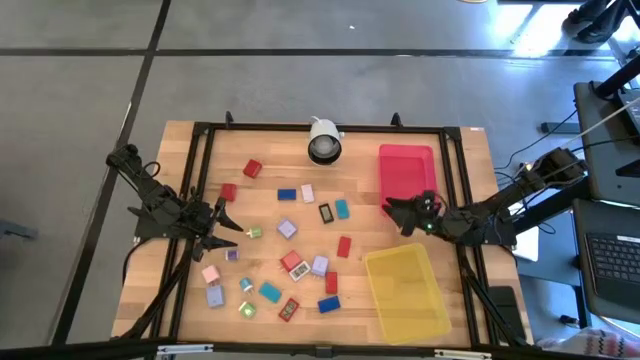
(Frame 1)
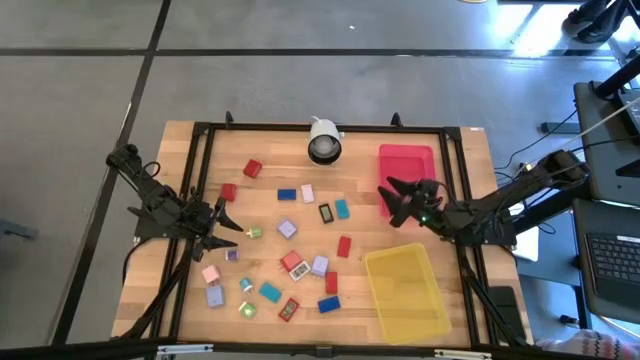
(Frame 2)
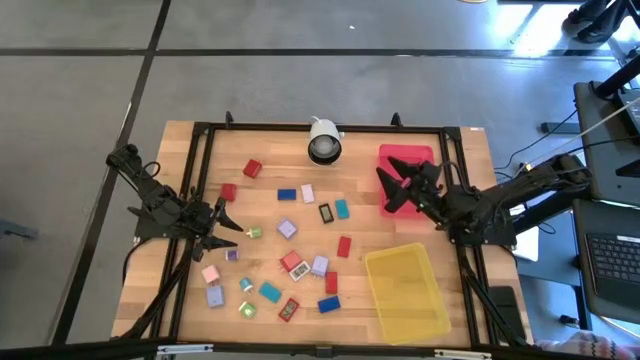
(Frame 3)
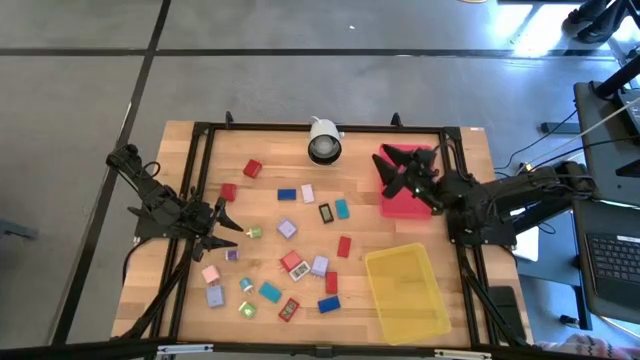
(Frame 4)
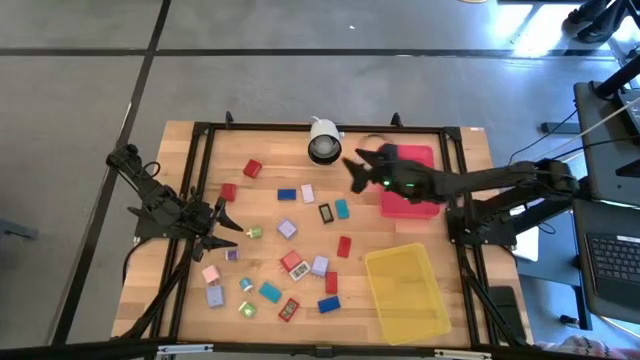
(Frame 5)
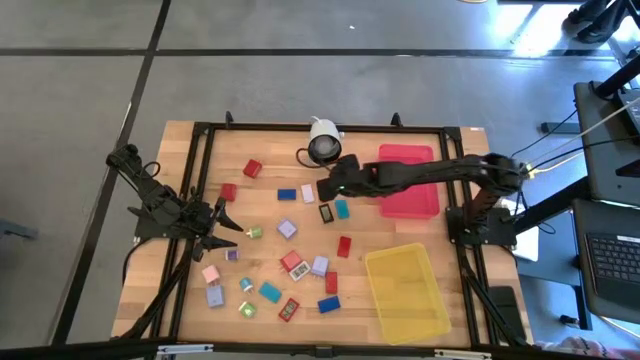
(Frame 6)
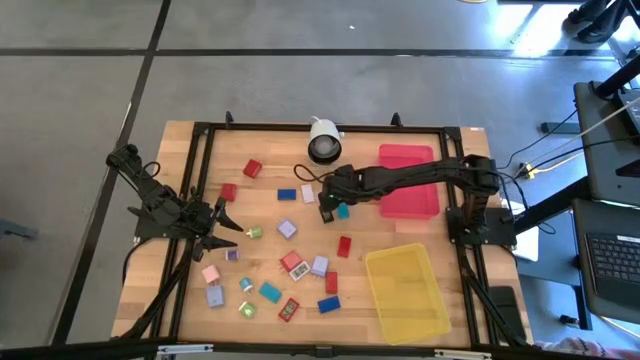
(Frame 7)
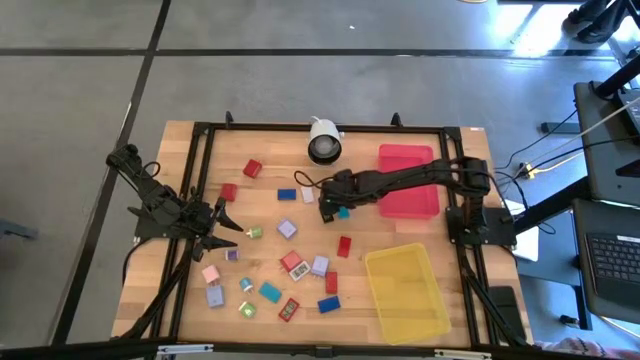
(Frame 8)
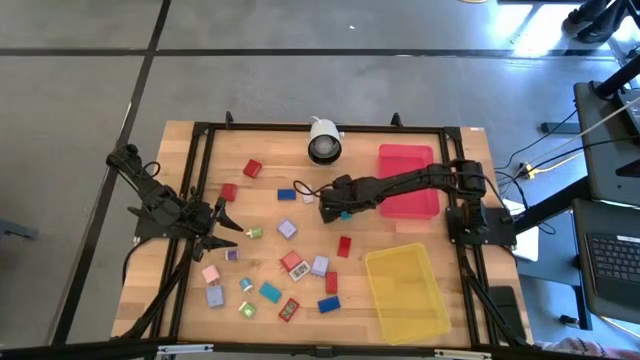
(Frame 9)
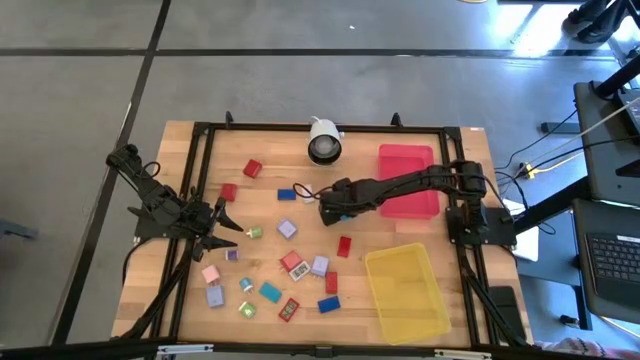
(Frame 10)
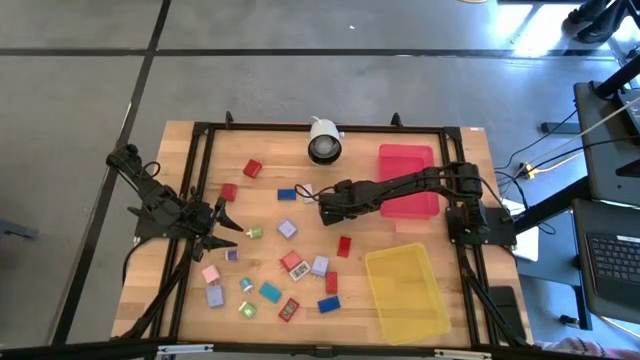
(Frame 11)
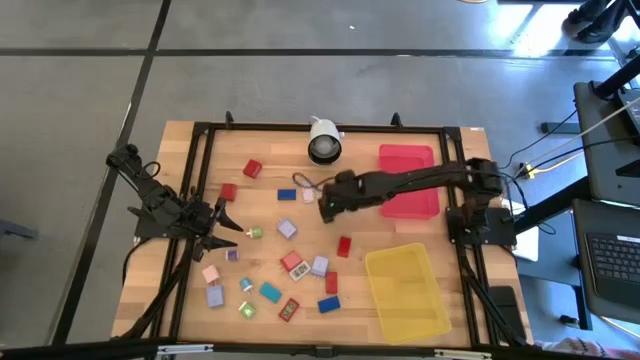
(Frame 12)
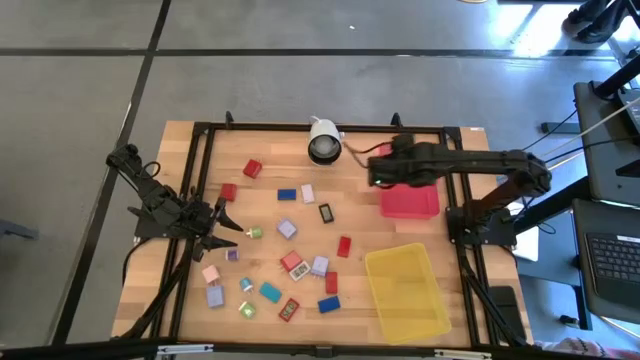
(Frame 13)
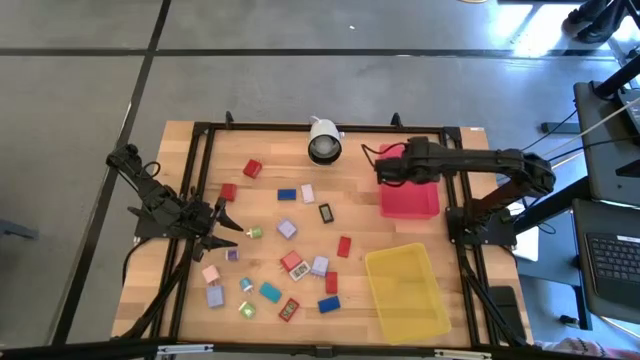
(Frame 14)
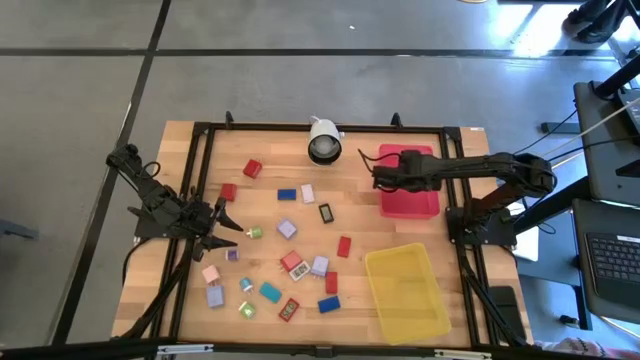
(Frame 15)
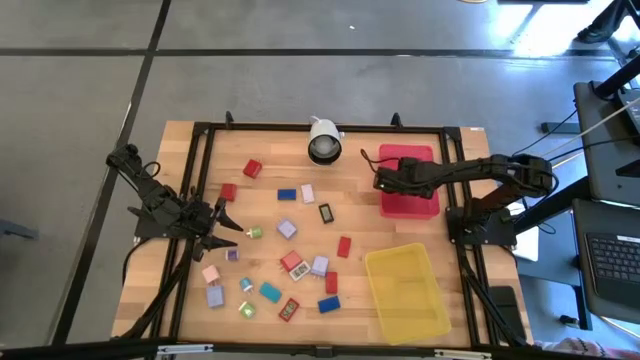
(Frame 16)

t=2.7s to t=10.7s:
Task: Pick & Place Office items
Put the top light blue digital timer into the pink bin

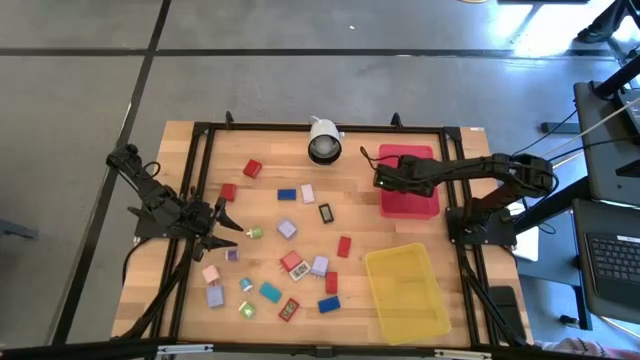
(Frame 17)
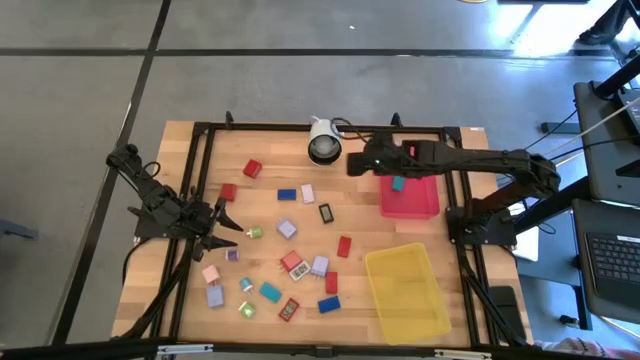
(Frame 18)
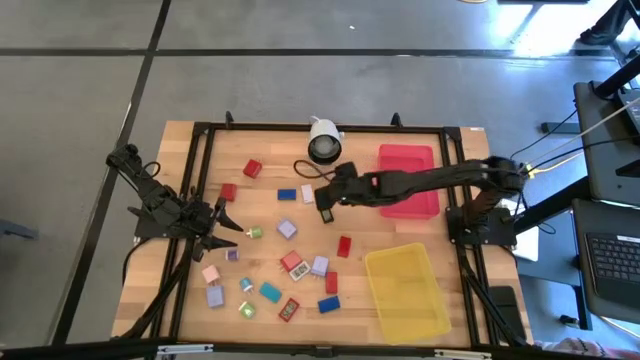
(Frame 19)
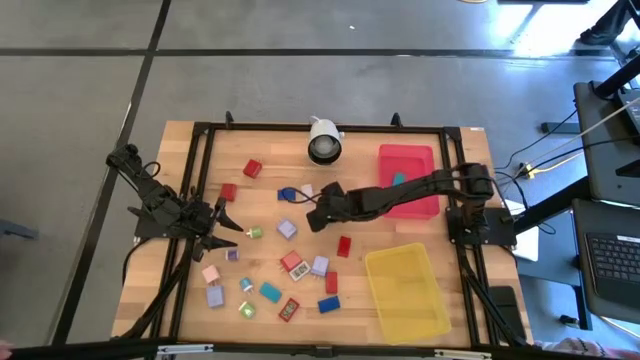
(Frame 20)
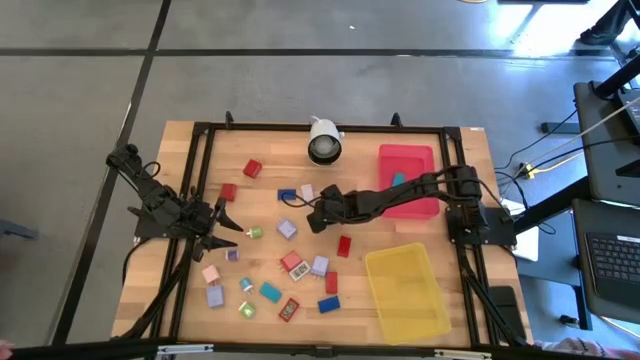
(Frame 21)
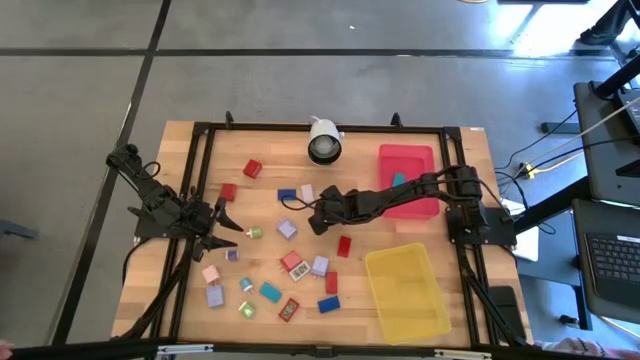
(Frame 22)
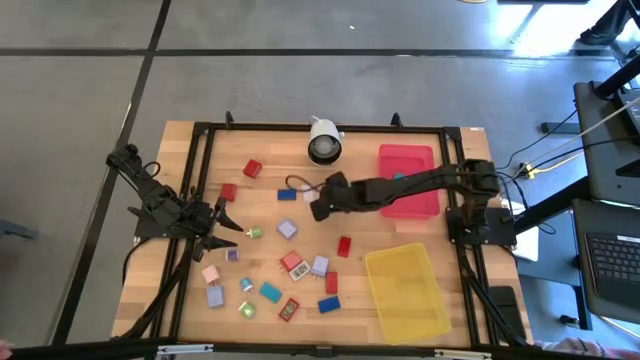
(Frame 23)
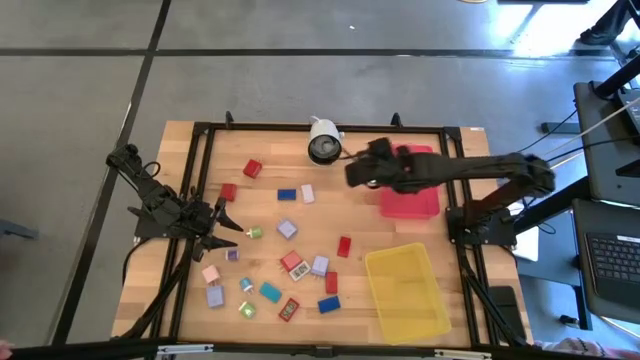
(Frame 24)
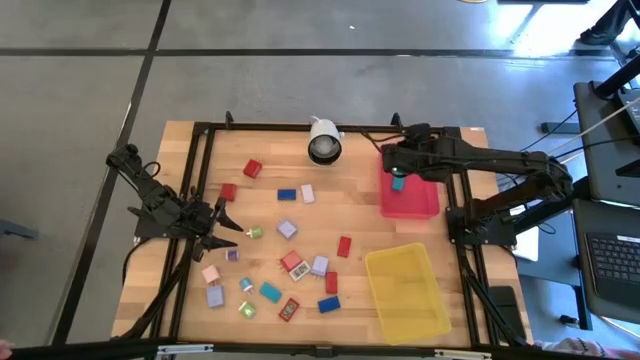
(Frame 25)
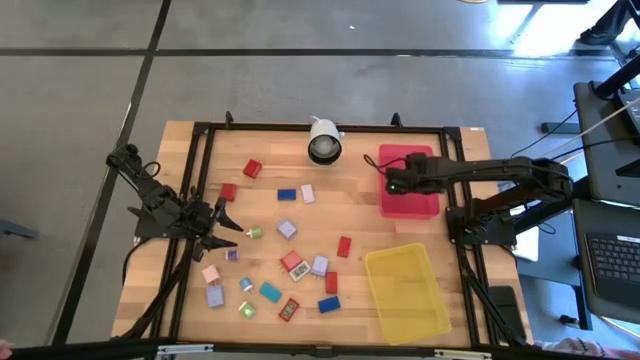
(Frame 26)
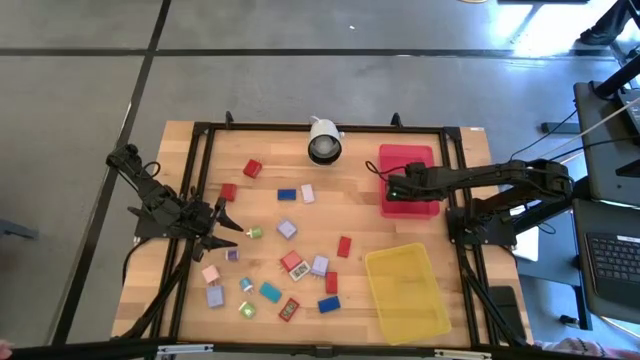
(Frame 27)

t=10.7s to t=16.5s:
Put the black digital timer into the pink bin

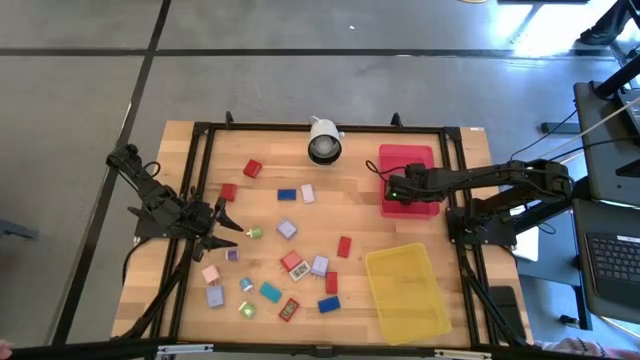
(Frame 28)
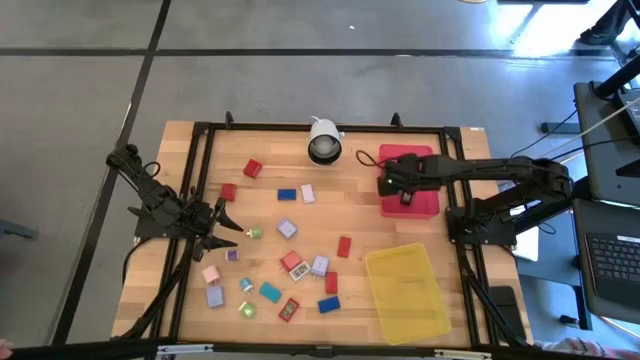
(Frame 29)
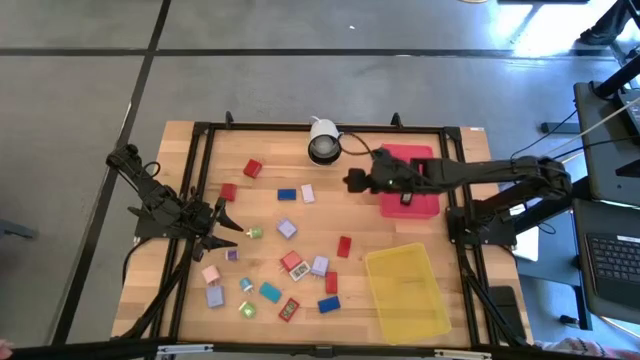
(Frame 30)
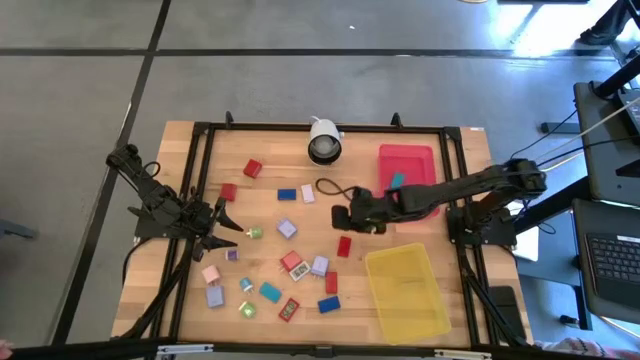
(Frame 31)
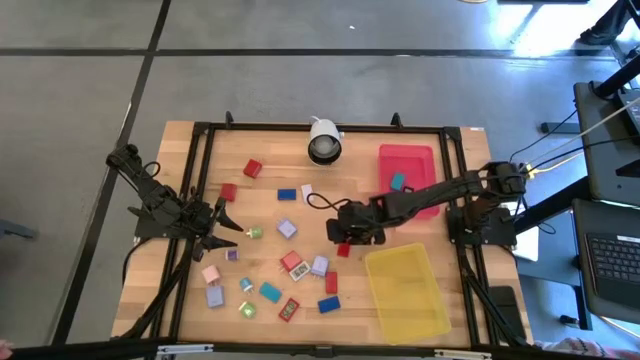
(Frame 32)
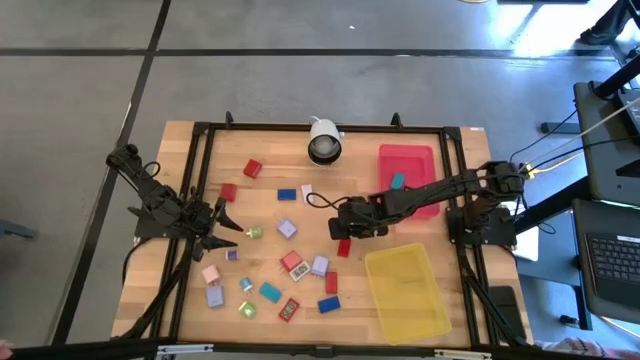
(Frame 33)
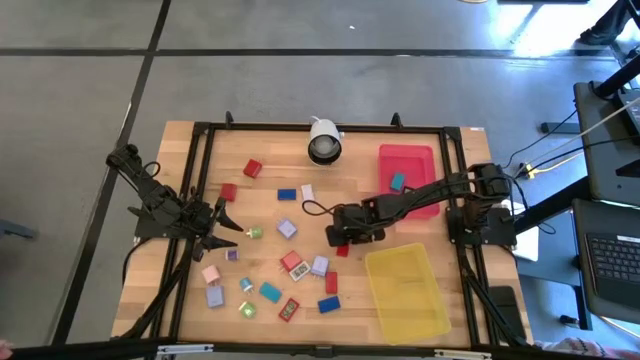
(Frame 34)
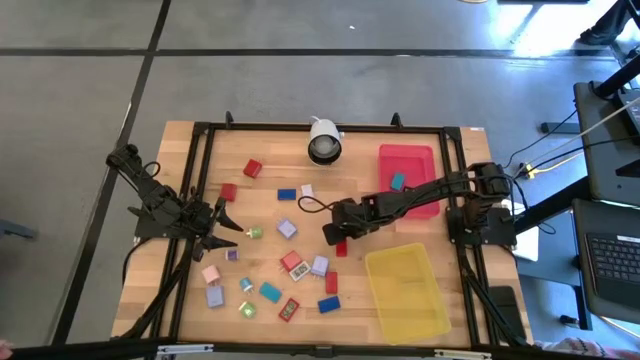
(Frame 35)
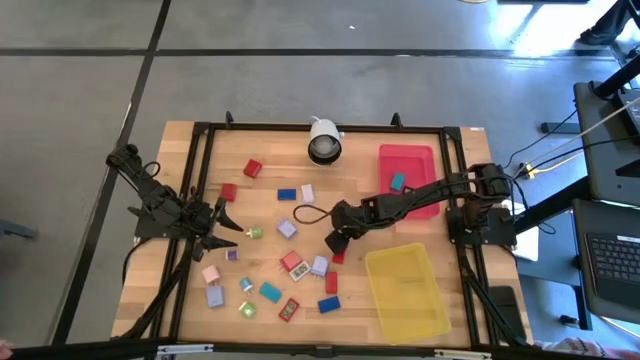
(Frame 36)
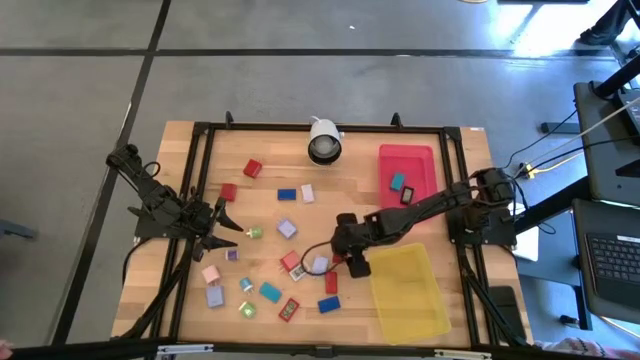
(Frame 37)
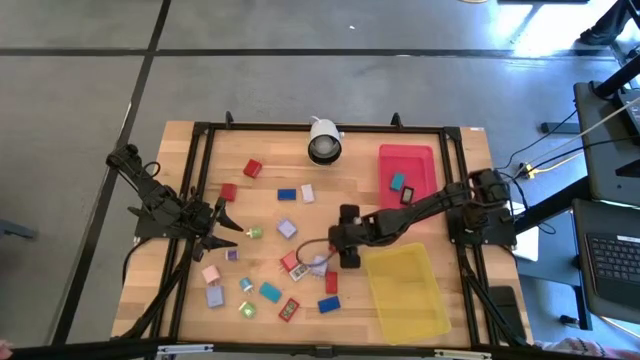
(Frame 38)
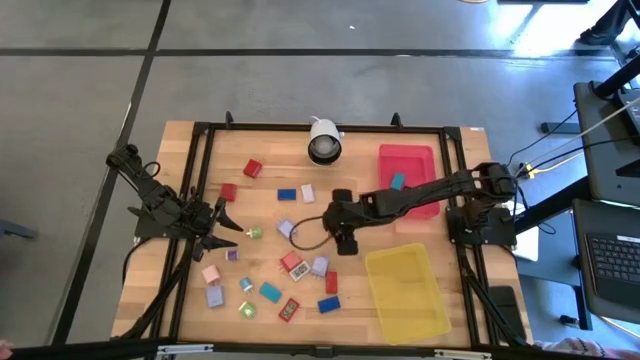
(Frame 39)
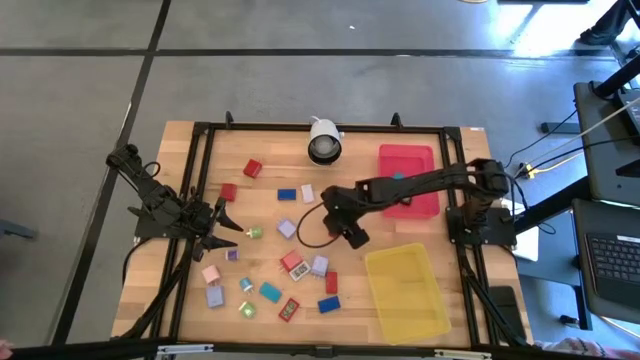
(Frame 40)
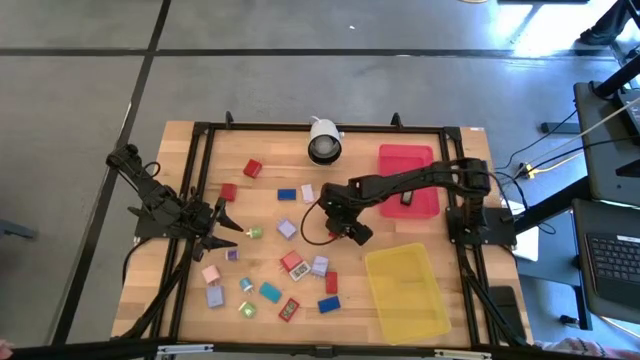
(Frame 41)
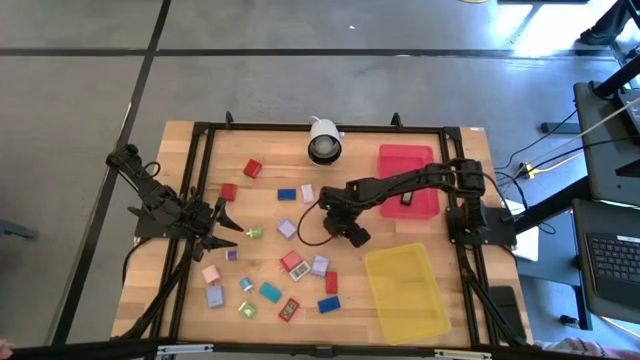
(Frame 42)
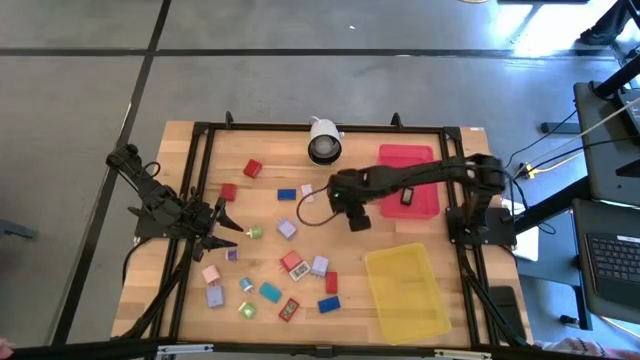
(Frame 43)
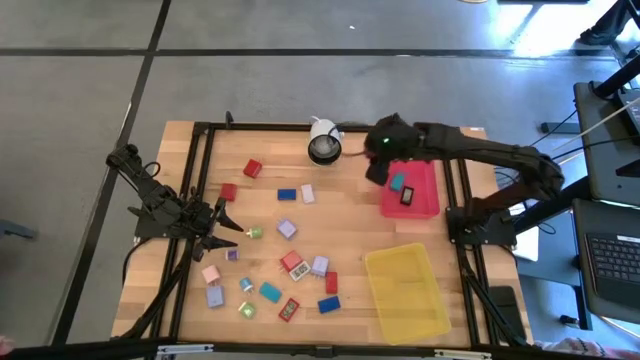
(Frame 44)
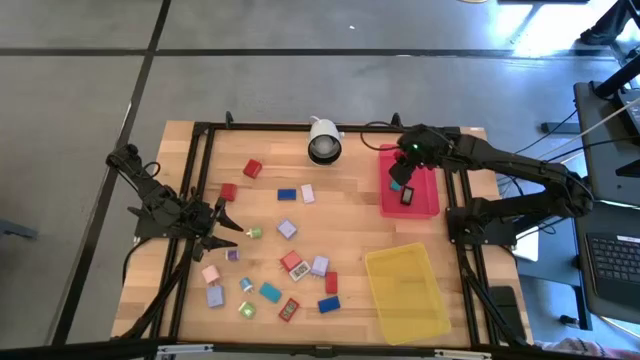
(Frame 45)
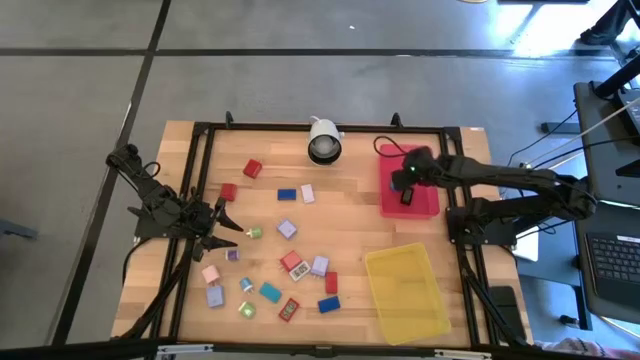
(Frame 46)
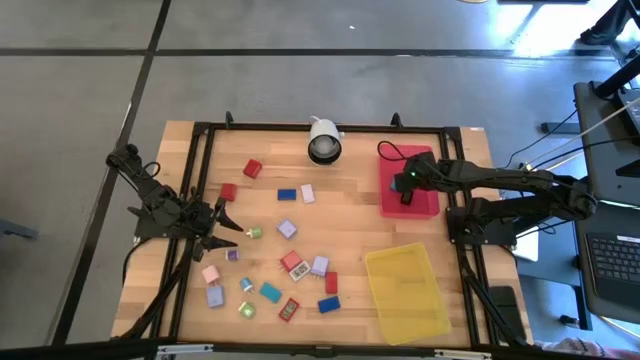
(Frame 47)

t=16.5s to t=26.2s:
Put the top red digital timer into the pink bin
